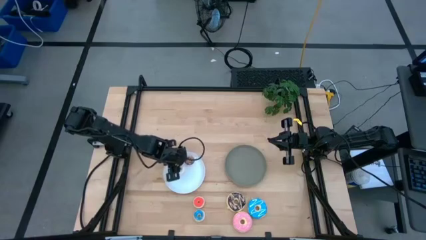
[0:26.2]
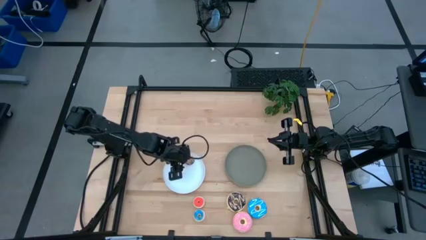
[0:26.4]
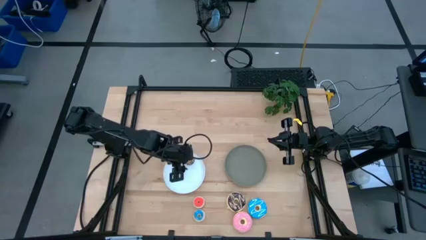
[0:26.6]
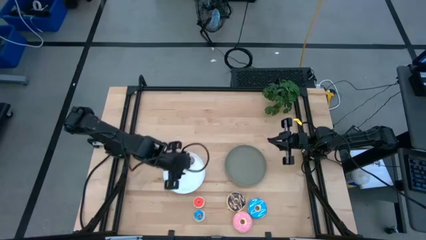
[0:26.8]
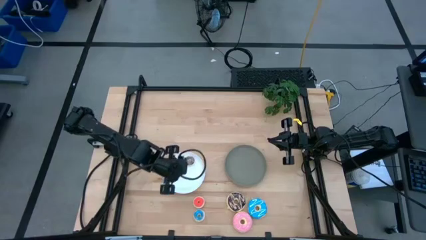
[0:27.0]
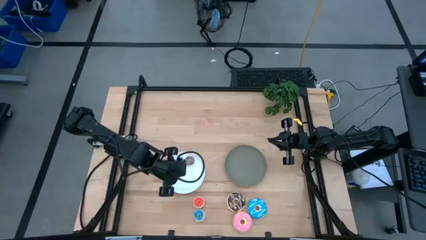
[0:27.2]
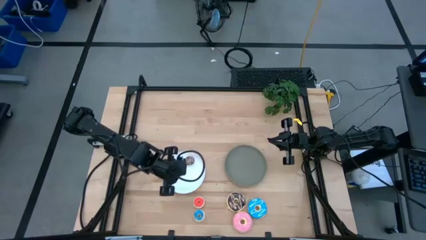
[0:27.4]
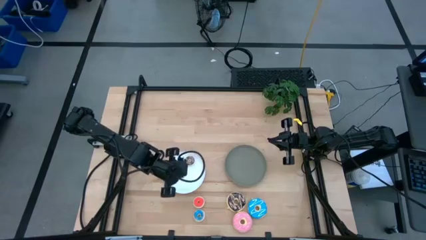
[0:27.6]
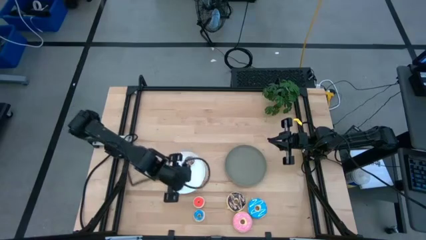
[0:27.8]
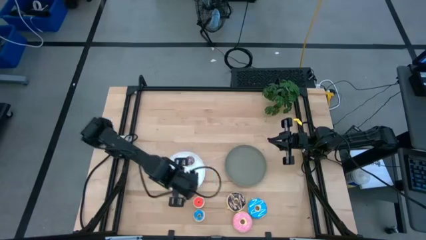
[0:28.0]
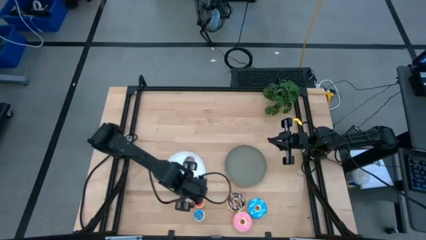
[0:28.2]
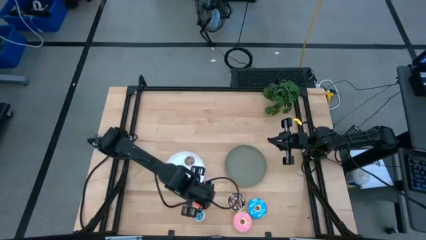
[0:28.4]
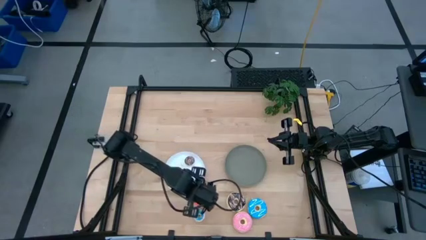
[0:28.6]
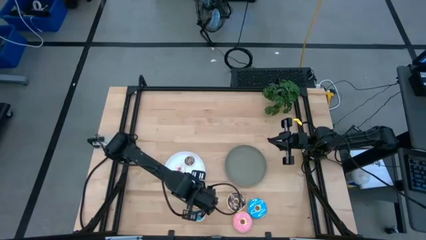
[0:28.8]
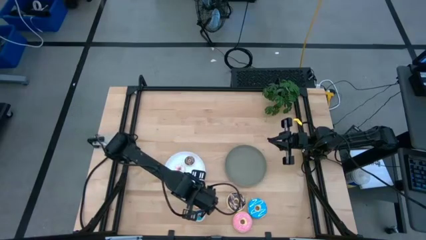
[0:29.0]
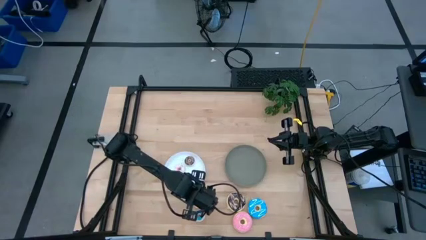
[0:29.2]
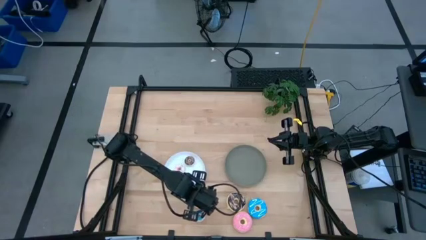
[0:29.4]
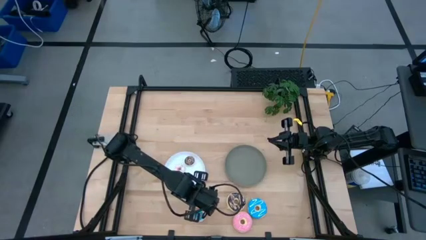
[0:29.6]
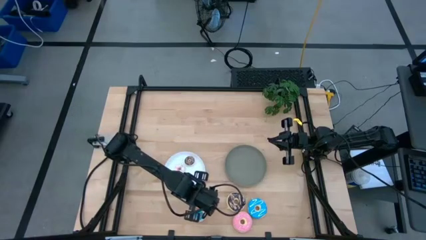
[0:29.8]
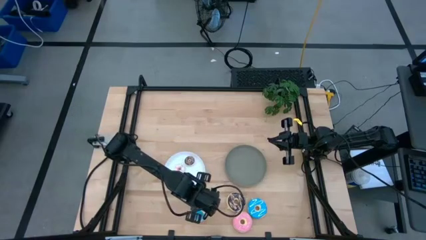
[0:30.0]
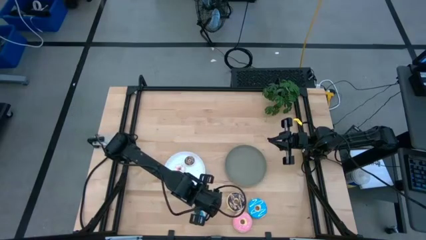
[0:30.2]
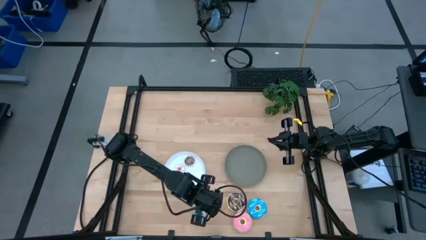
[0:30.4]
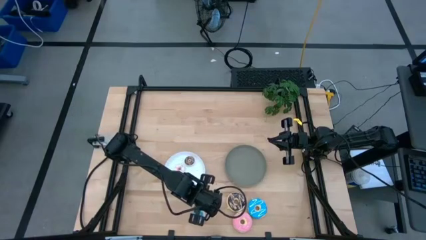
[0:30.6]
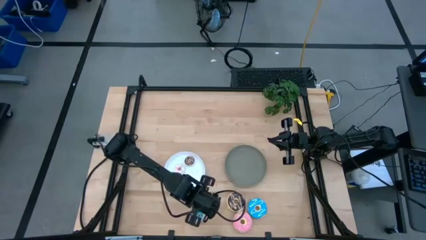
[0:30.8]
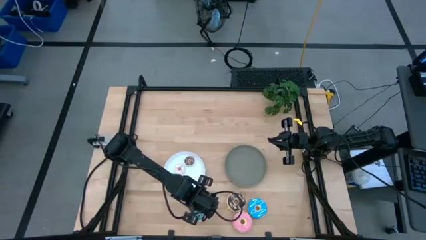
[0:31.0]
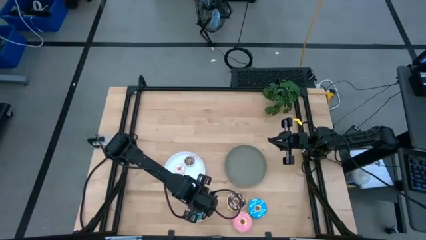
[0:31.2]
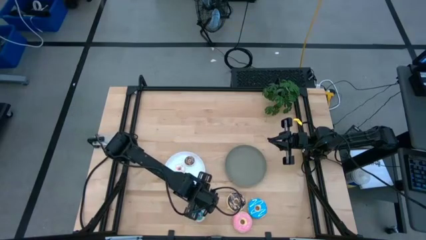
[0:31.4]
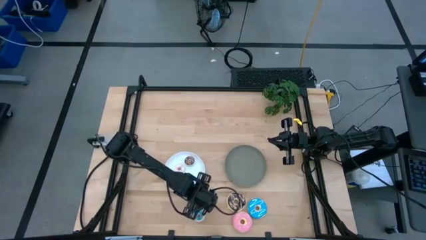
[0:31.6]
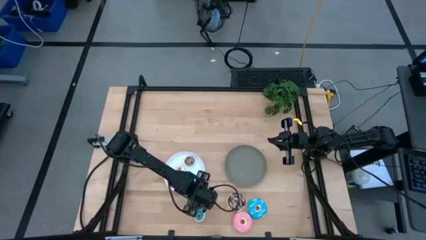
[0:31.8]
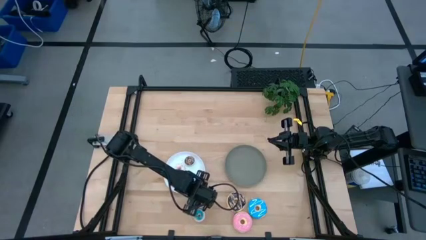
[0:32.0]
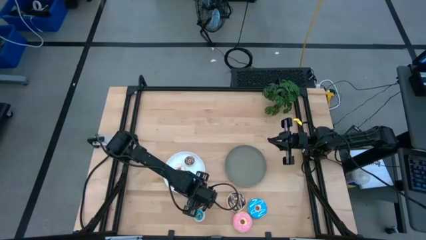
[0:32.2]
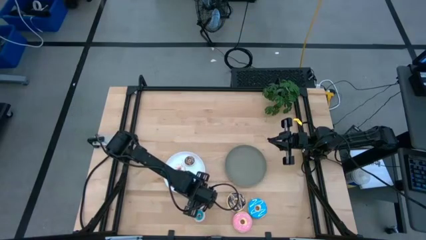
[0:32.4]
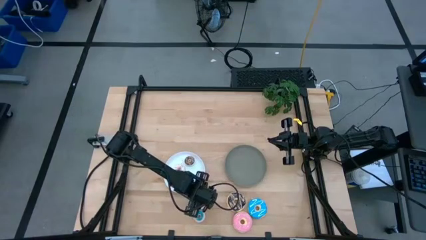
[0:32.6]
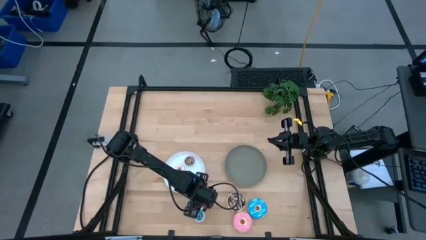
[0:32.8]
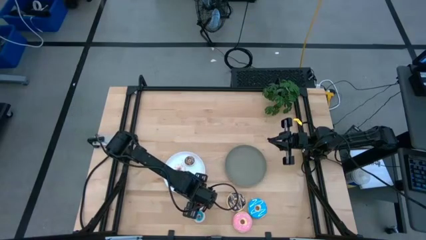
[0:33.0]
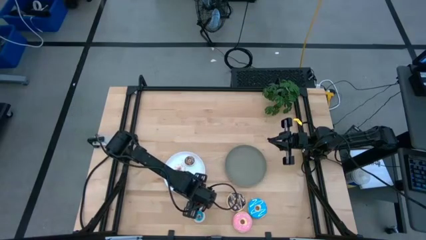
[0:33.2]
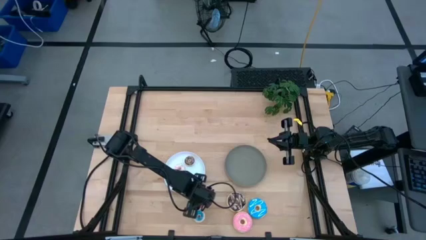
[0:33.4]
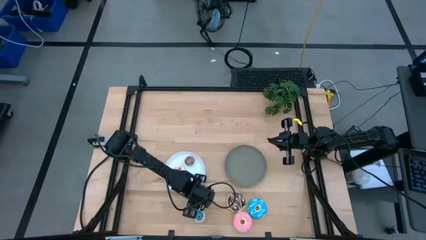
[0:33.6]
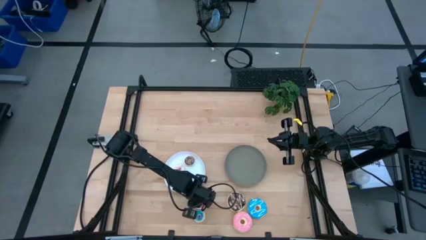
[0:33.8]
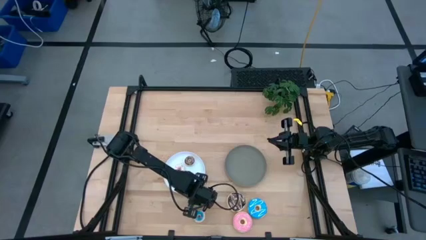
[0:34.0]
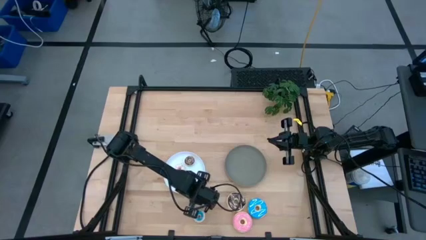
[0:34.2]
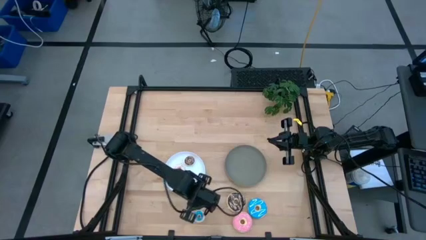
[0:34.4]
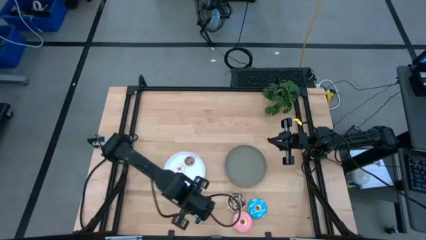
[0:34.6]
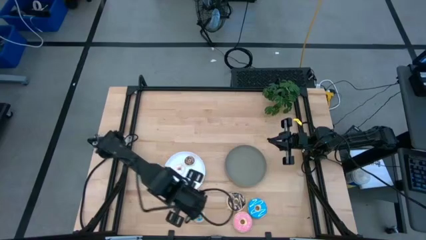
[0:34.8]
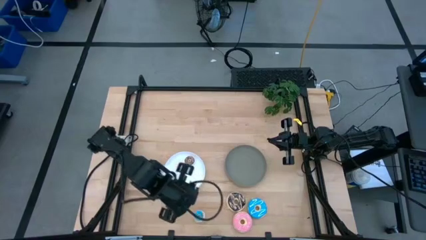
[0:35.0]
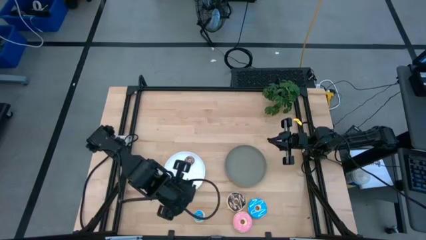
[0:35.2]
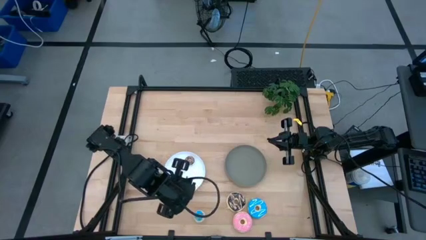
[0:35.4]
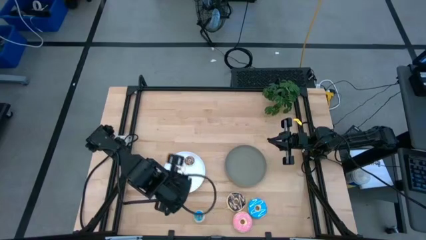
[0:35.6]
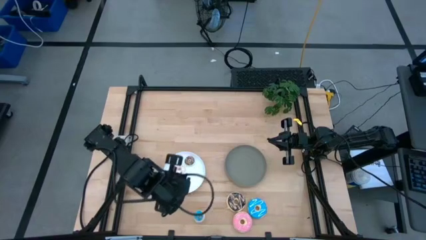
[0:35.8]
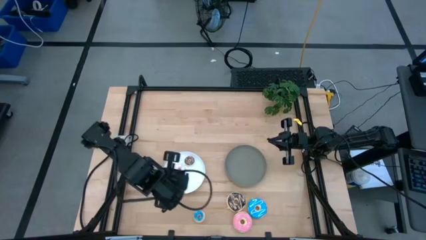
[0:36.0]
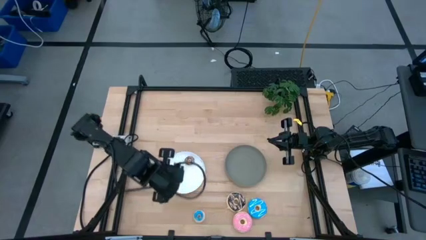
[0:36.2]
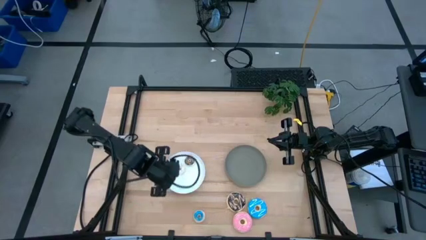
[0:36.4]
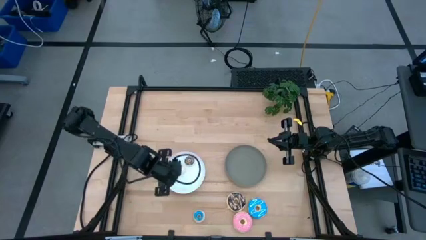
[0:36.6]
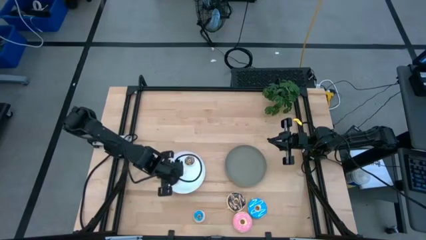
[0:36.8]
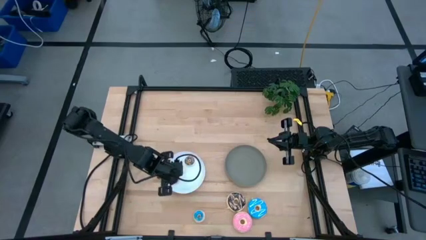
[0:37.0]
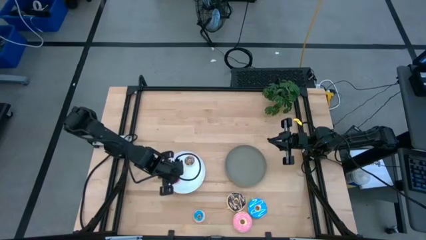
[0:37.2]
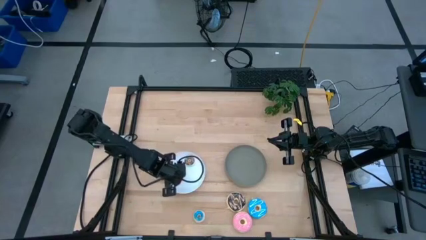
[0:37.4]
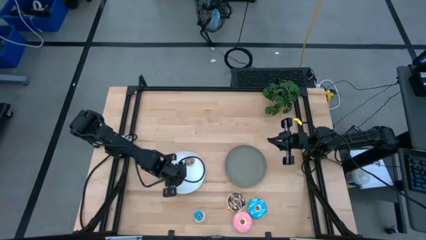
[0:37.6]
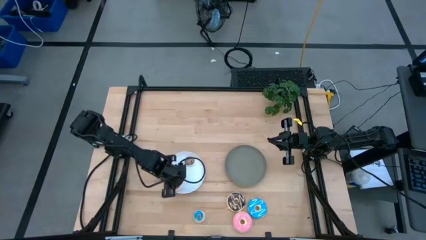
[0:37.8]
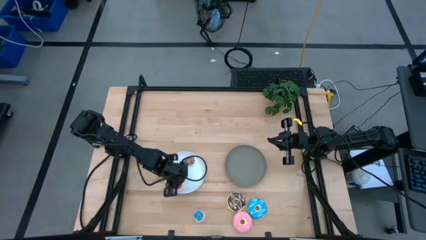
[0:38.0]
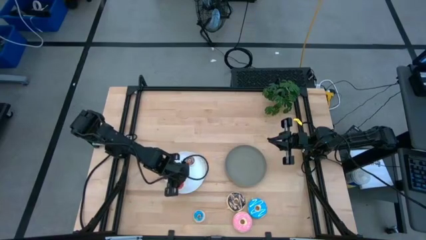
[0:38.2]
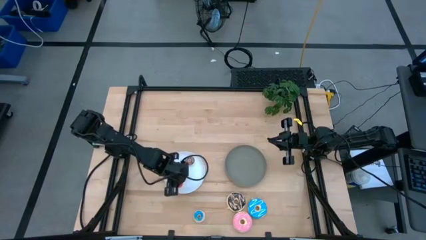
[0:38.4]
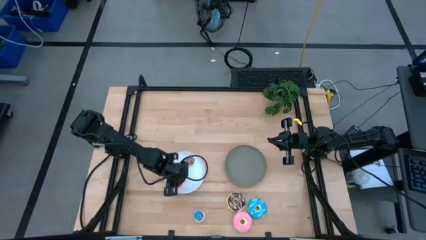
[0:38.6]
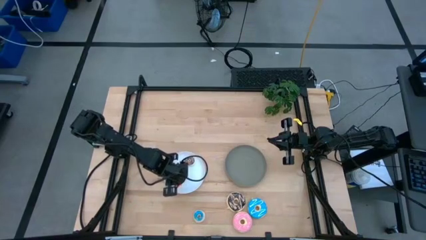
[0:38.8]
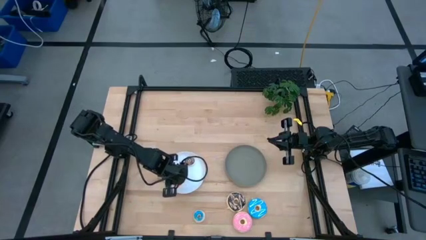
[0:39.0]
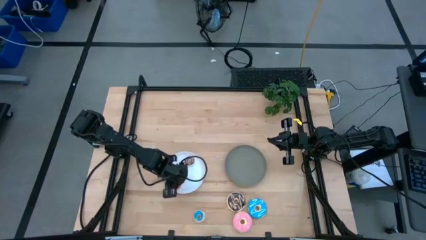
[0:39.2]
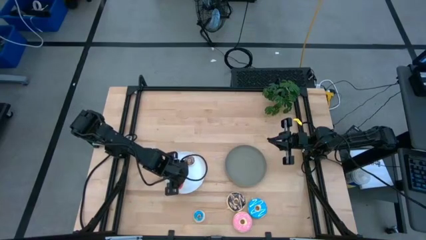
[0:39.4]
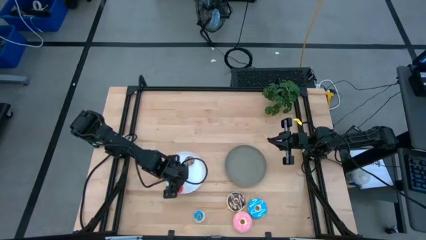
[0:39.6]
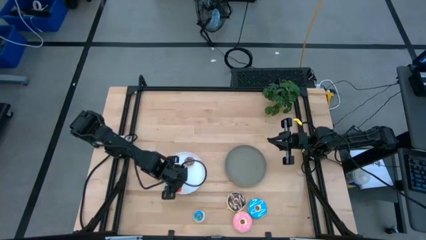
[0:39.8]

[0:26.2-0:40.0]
Task: Pick & Place donuts
Put the mini orange donut on the white plate
